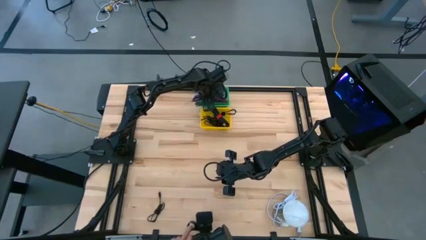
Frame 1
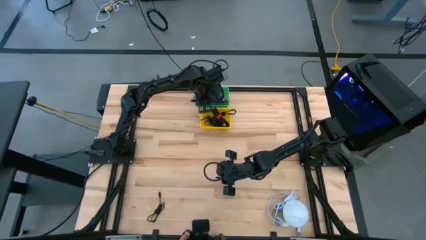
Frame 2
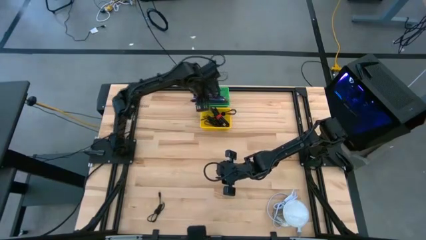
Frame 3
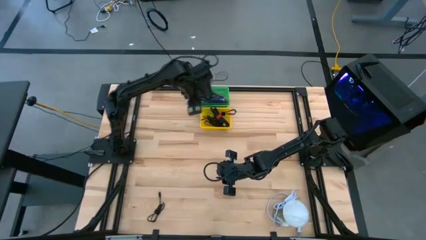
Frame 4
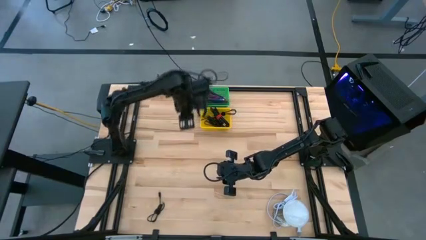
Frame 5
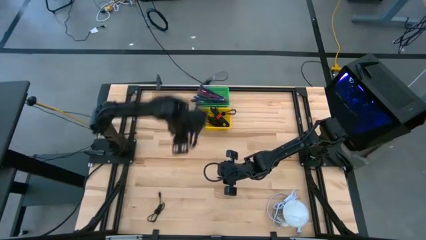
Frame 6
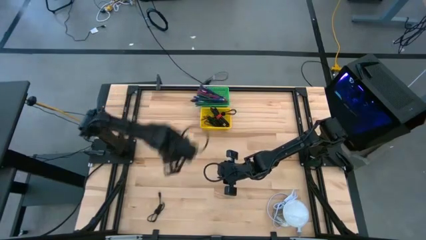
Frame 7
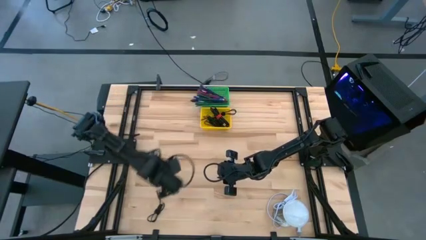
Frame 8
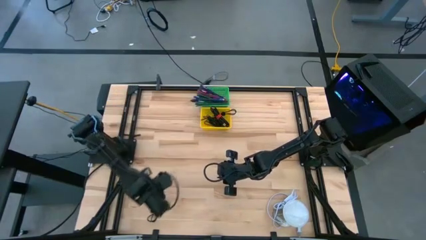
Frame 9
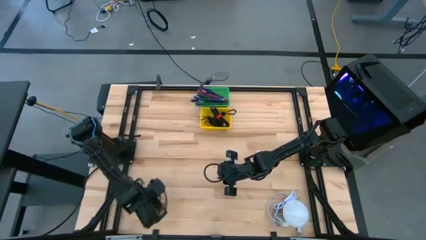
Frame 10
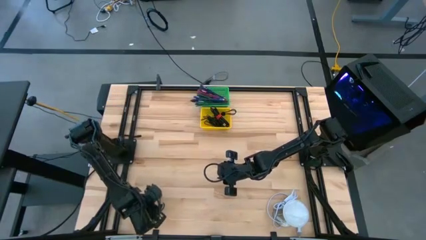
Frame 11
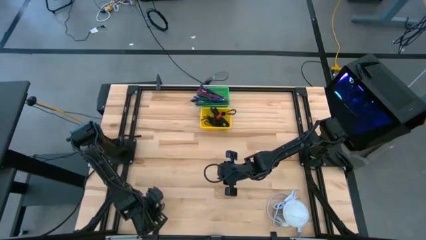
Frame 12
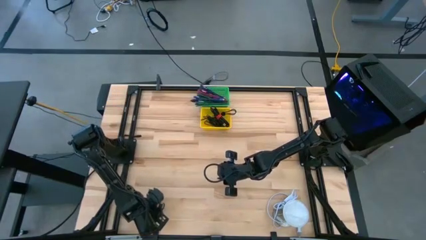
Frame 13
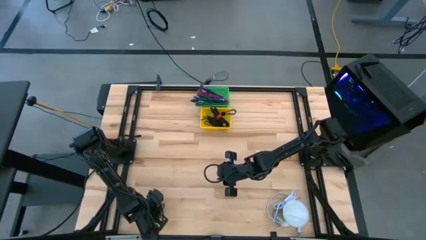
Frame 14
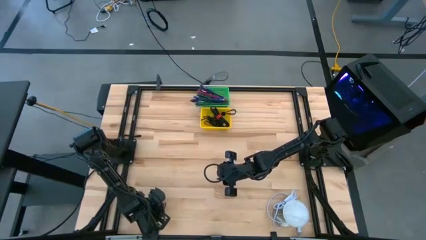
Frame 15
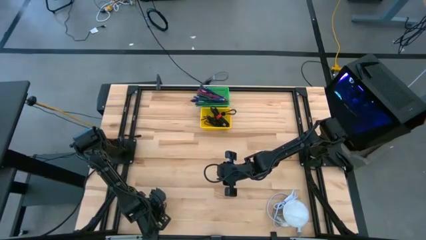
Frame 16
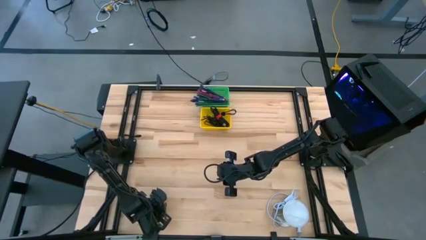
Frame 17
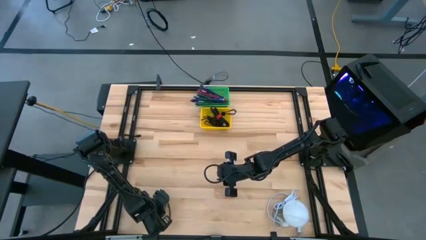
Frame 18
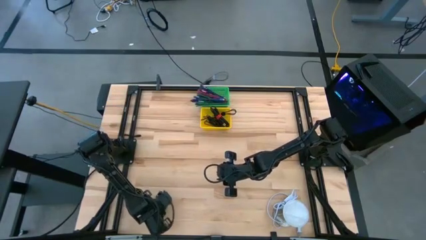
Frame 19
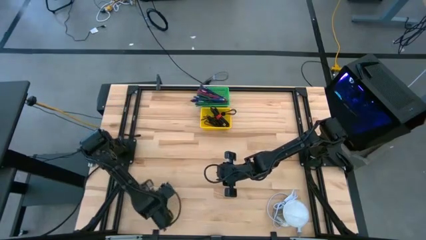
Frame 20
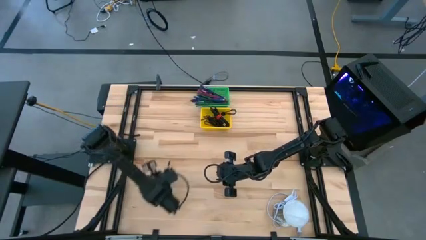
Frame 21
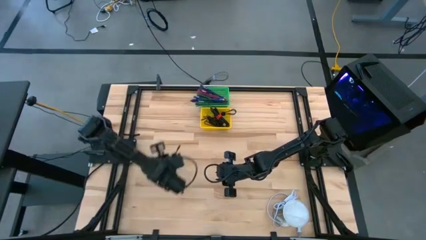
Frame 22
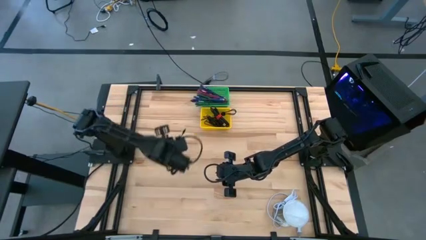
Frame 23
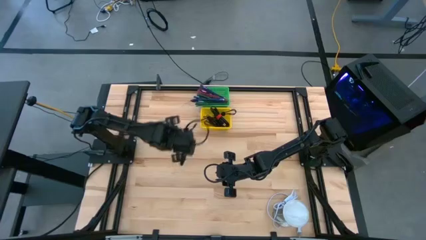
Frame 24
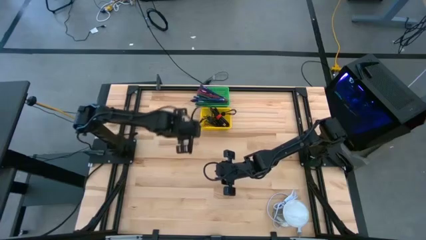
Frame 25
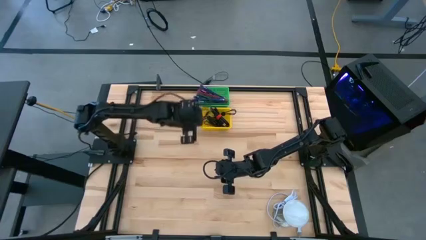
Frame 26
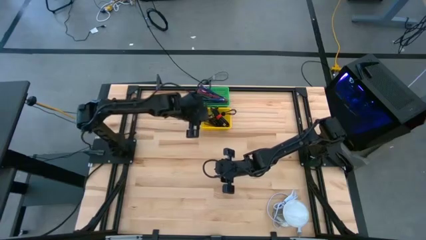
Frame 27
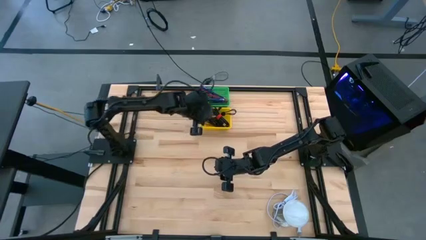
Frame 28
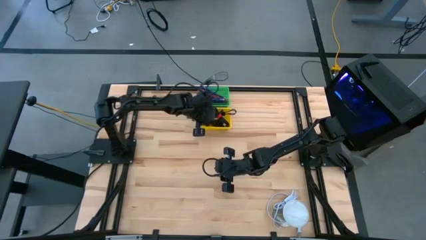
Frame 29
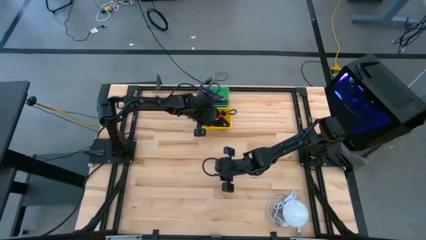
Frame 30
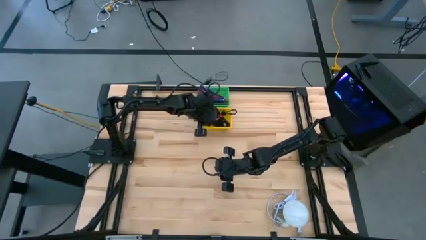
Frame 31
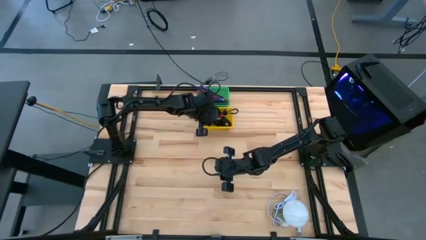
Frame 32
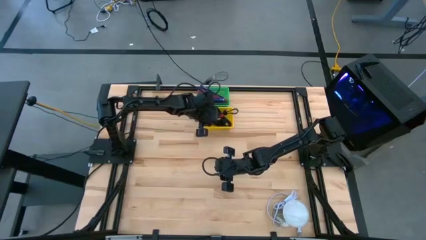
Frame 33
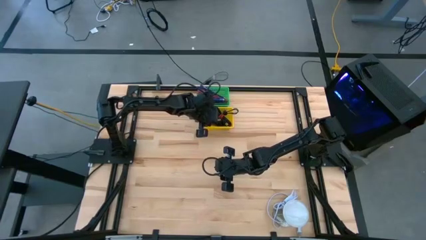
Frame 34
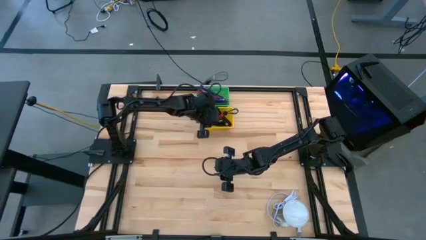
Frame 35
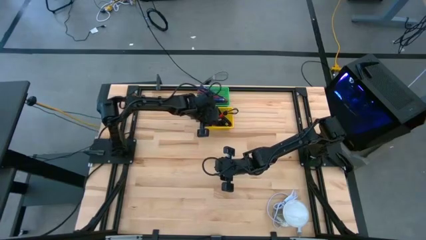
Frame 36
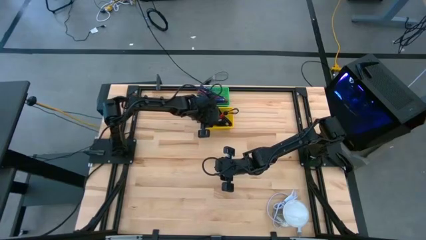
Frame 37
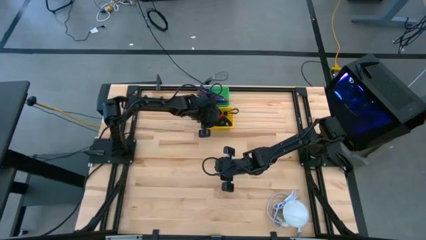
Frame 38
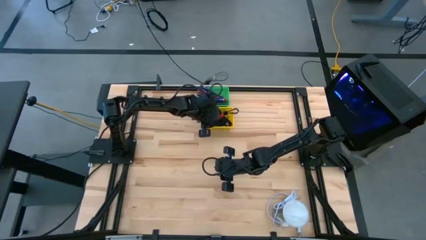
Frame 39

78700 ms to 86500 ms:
Task: Pick & Place USB Port
Put the black charger cable into the yellow basket

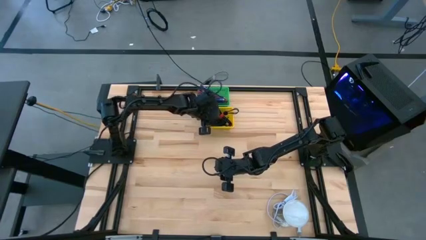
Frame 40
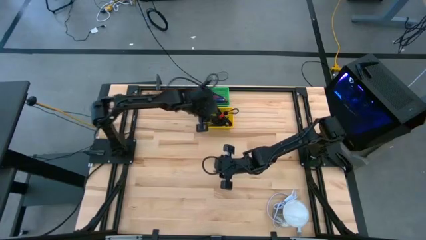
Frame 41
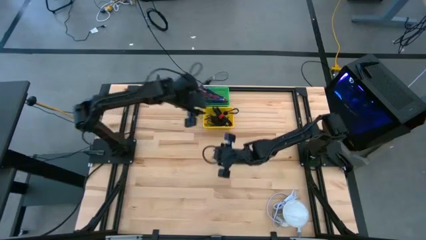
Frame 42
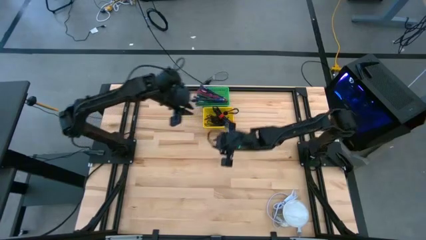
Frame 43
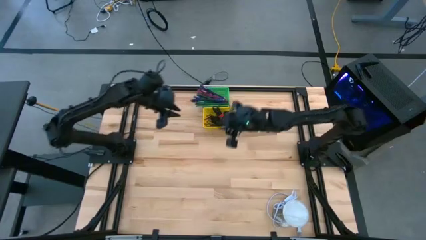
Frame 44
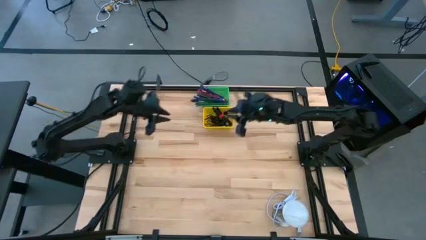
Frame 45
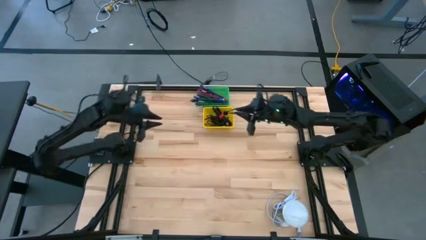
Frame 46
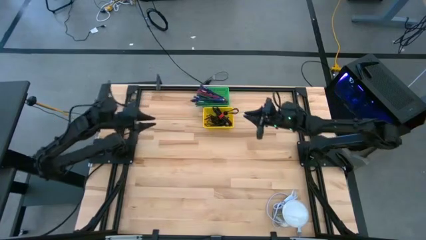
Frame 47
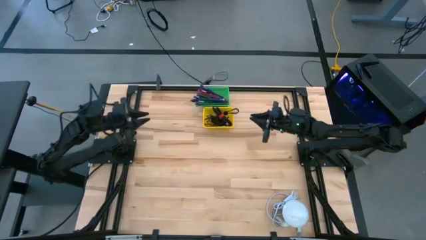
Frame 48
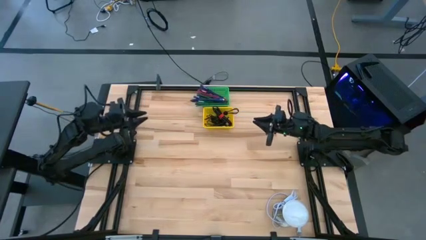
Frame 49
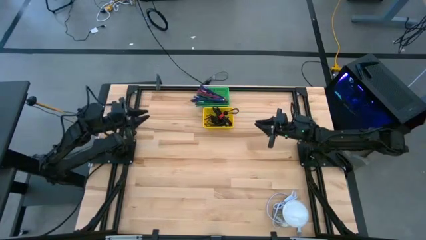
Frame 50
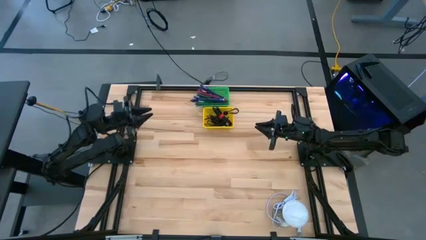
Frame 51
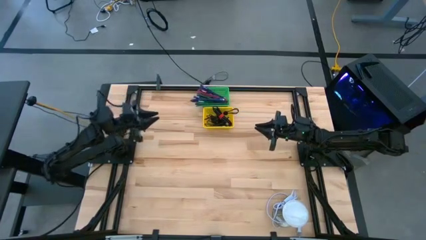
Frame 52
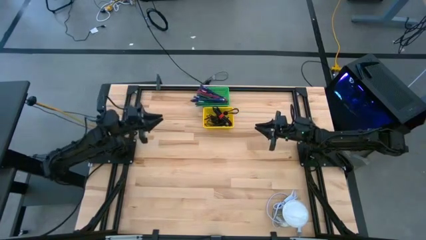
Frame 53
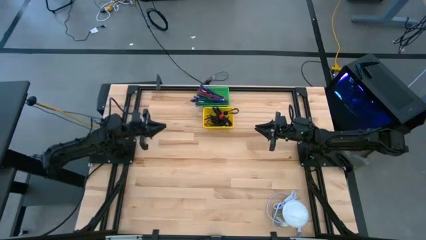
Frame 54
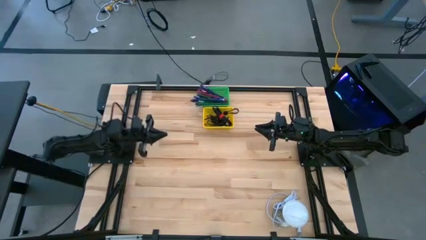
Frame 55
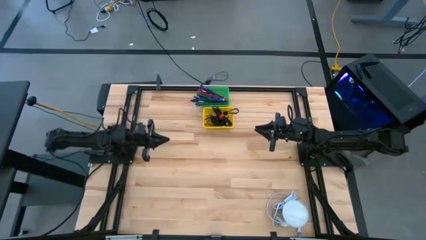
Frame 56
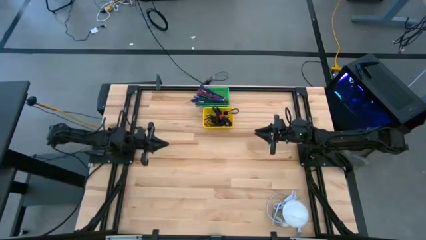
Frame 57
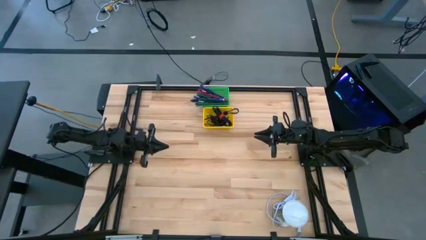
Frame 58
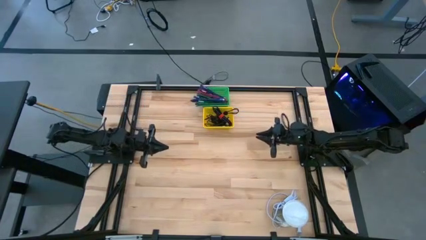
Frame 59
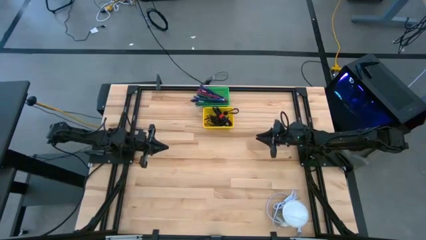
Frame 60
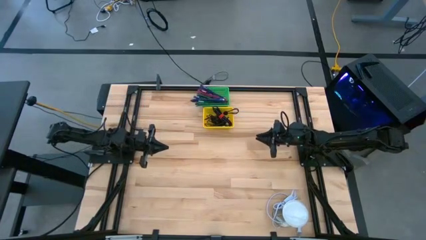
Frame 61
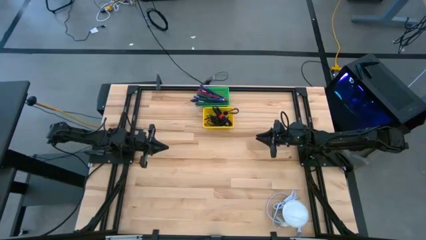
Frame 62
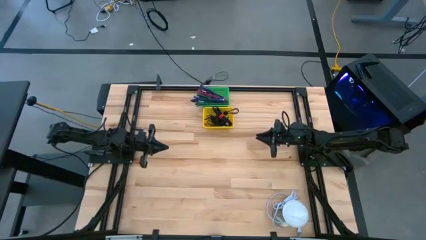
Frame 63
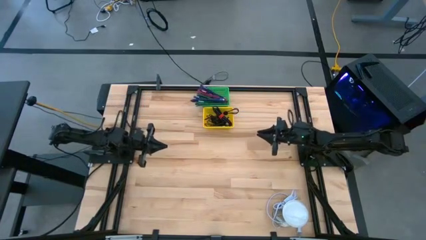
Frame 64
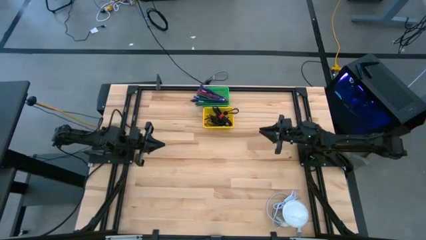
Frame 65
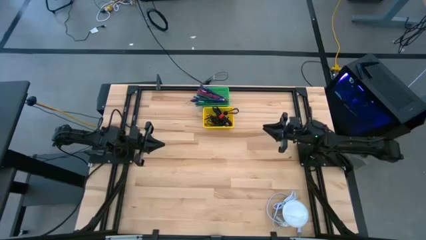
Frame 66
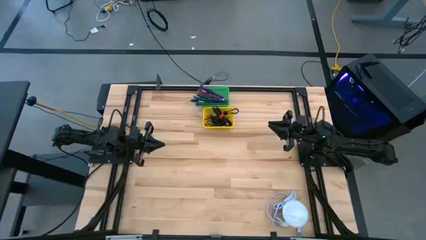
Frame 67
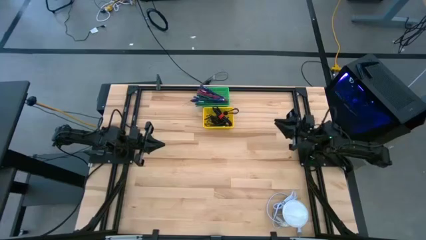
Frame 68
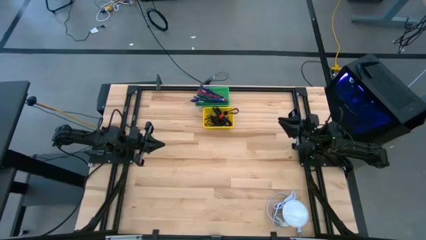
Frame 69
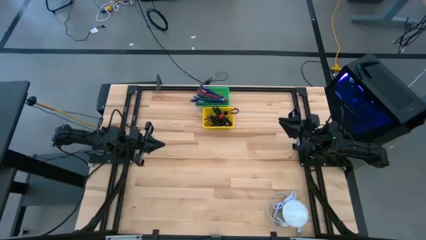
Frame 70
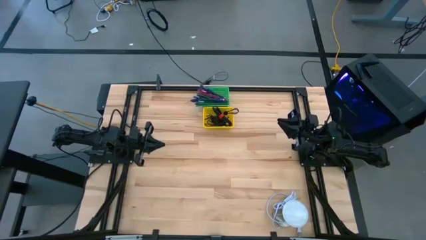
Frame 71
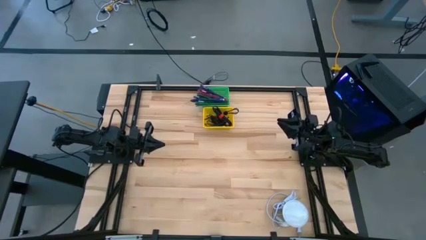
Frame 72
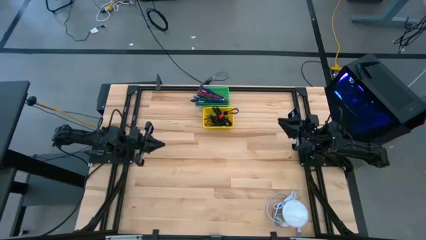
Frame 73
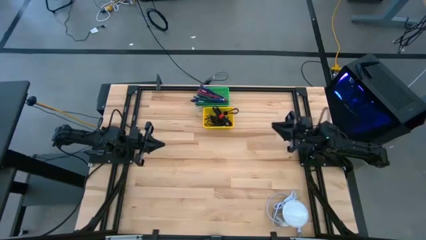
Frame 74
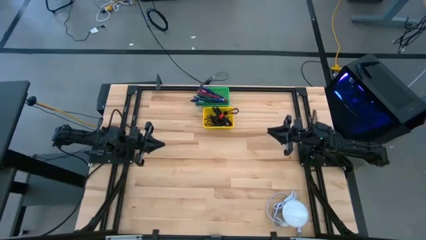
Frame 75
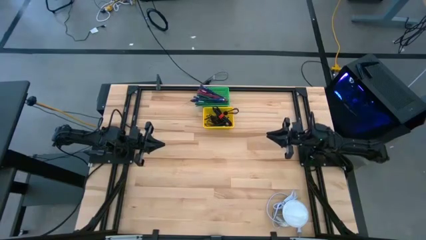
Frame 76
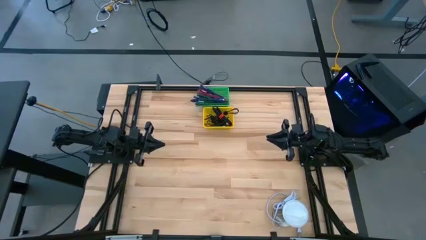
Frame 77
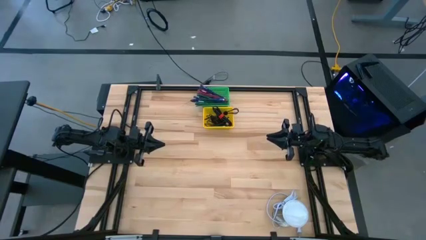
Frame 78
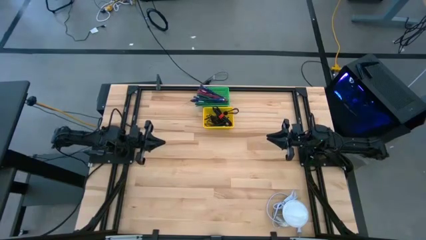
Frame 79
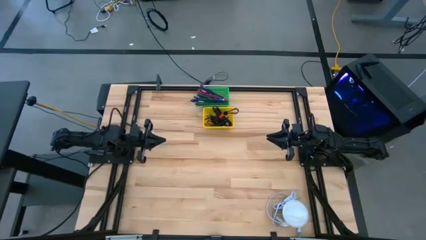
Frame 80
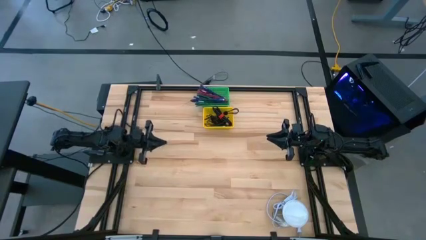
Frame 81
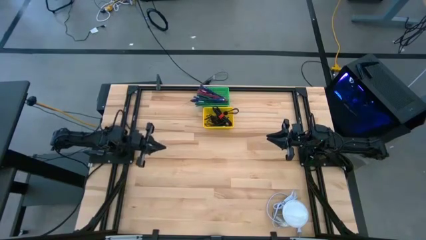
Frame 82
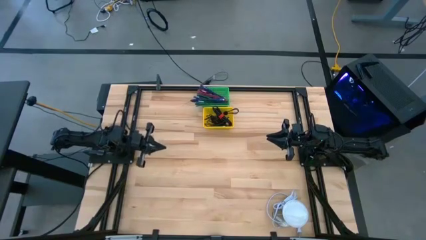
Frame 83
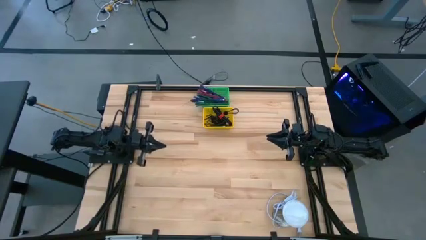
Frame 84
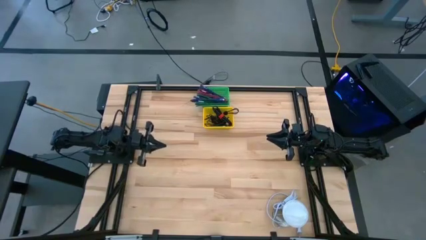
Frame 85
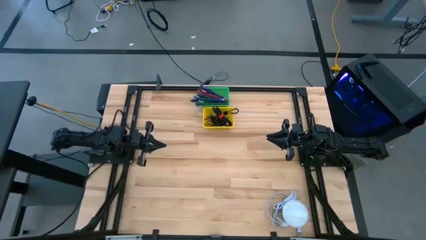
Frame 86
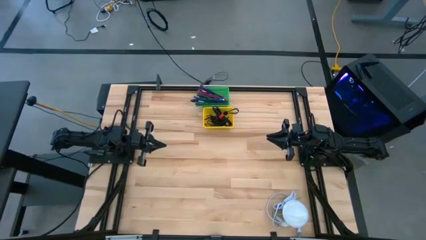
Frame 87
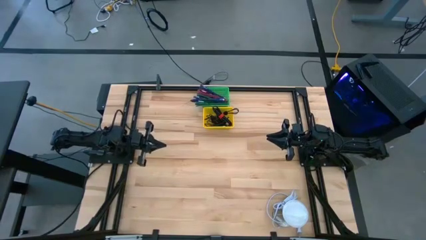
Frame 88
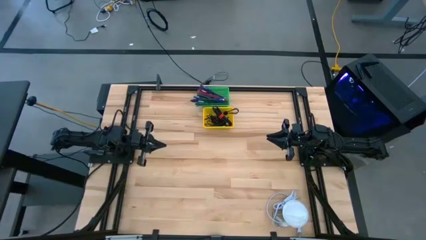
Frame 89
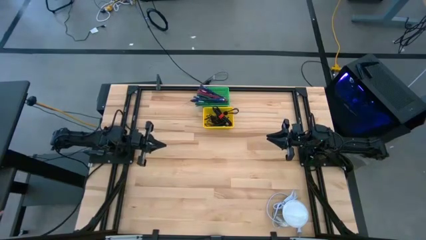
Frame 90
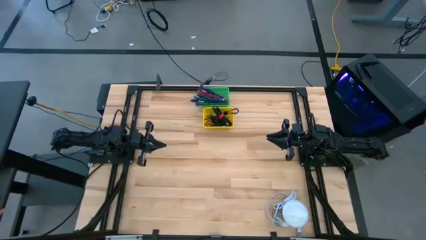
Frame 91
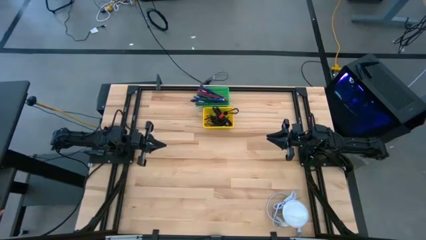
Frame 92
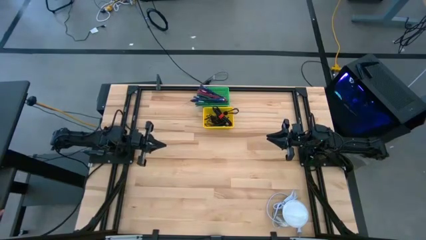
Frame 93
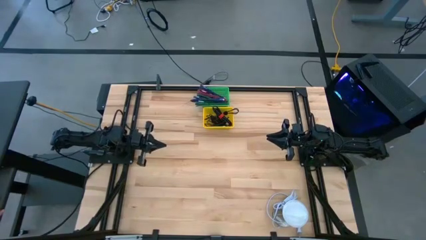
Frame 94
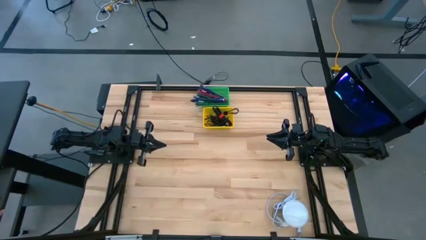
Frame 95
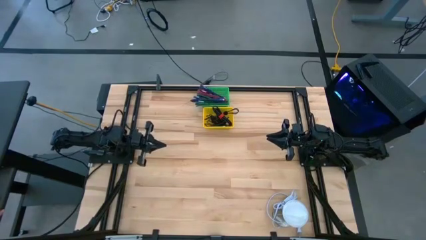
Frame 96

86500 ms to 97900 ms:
Return to Home Position
